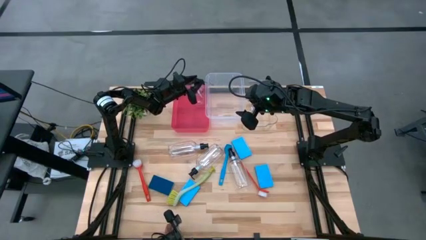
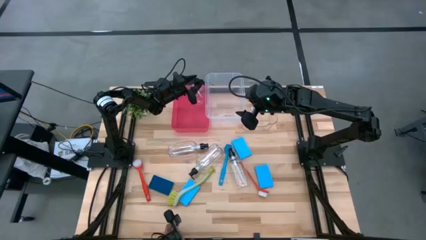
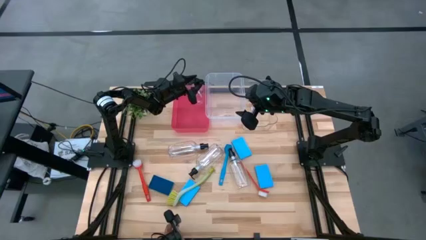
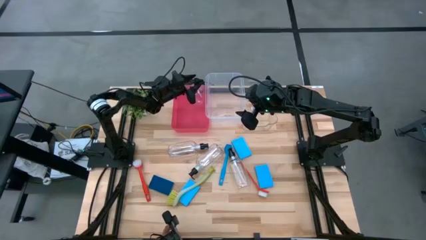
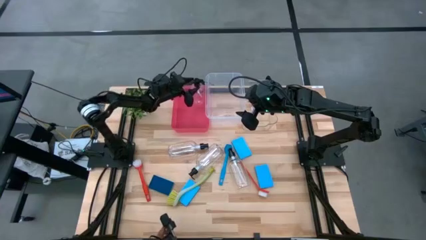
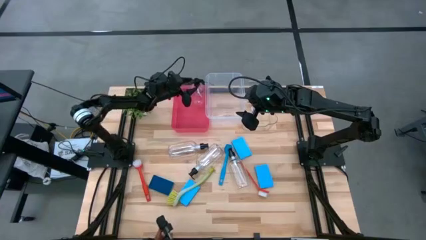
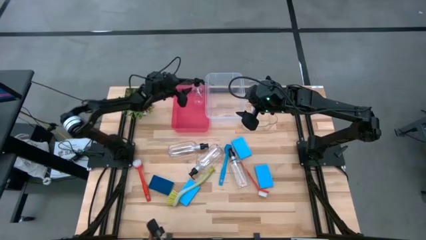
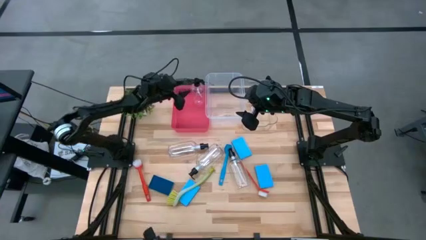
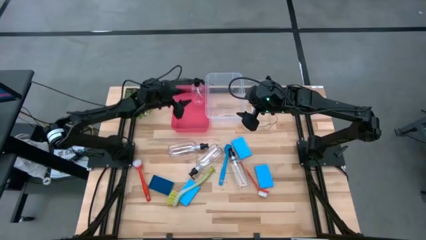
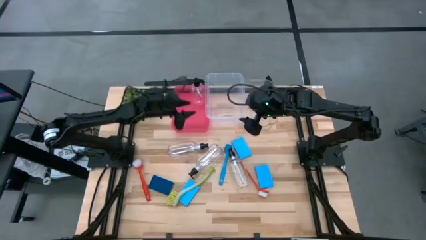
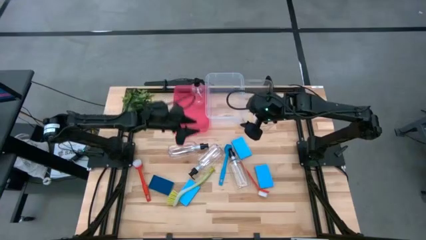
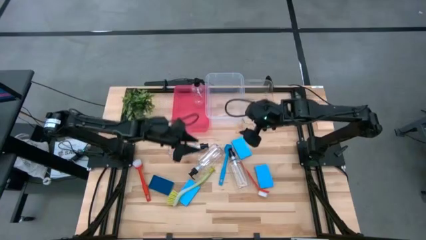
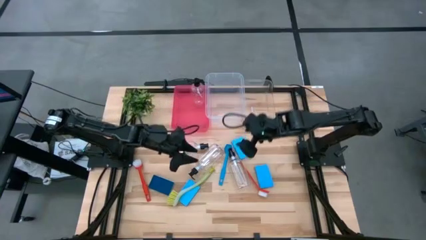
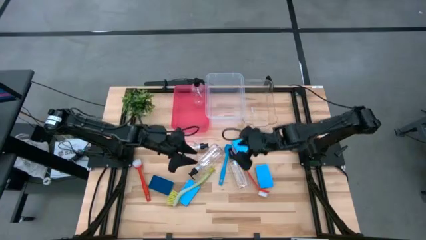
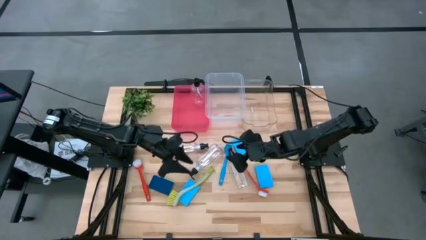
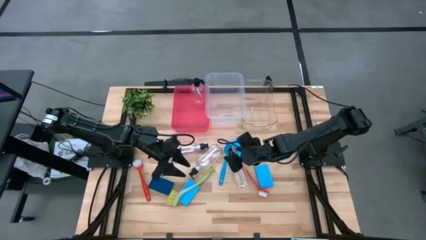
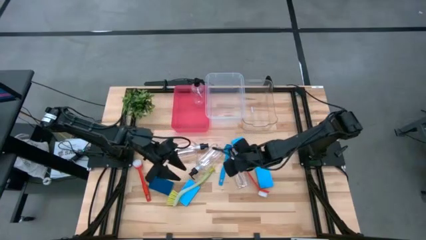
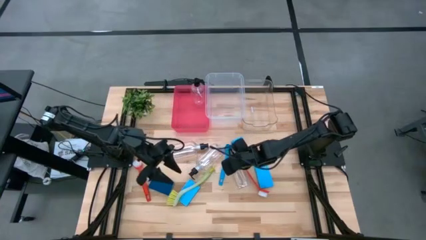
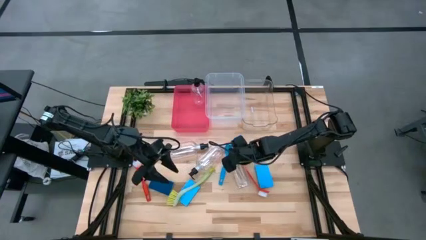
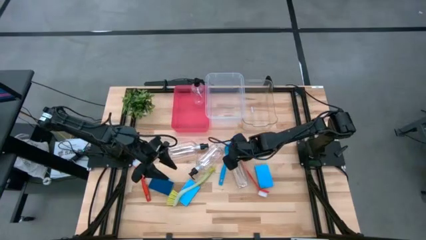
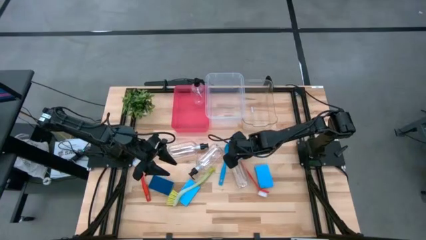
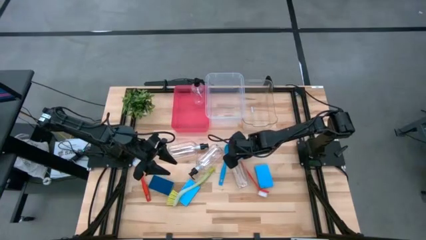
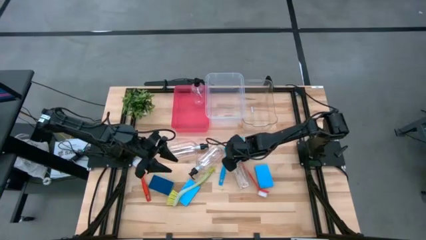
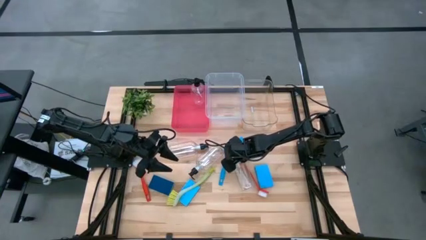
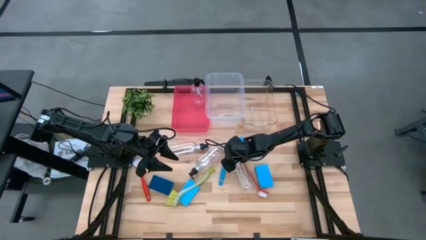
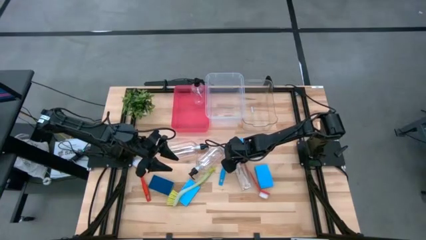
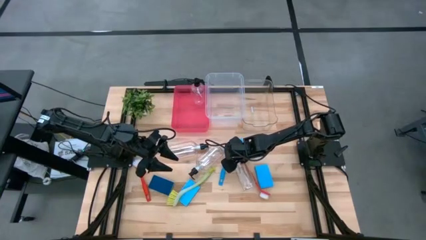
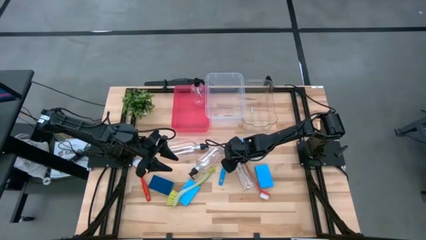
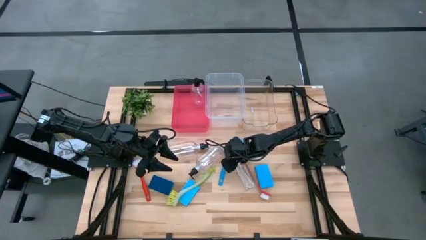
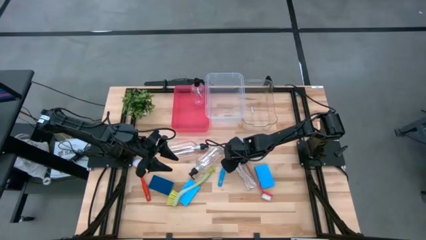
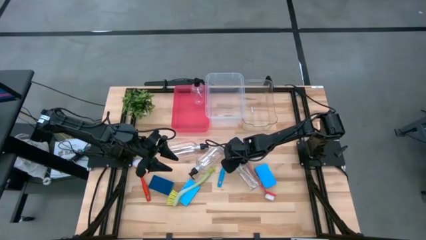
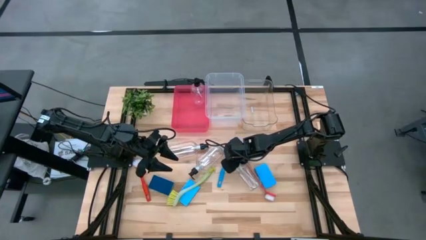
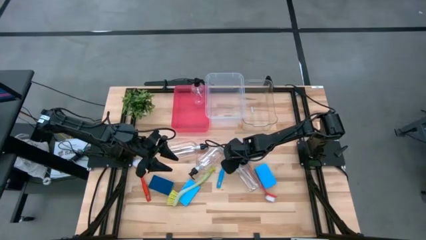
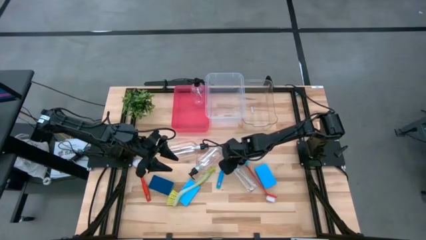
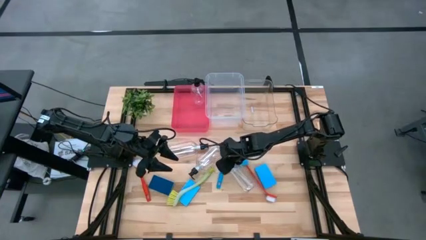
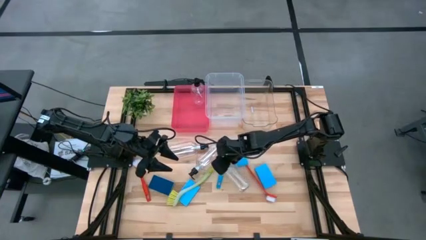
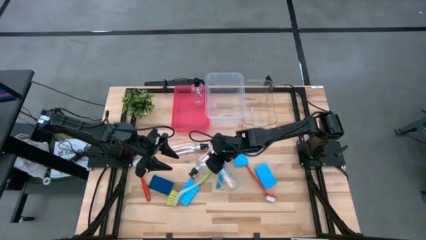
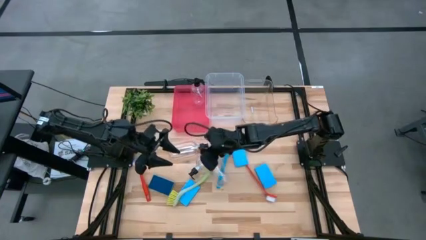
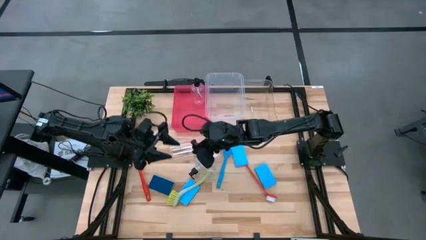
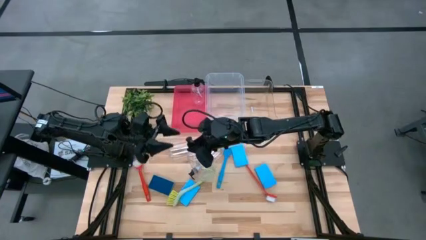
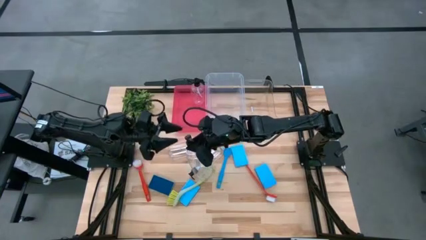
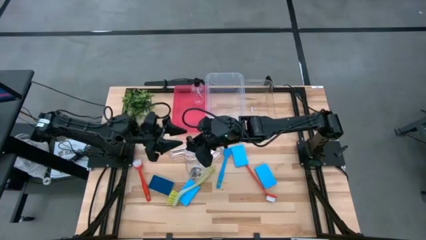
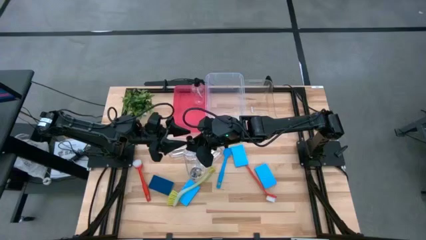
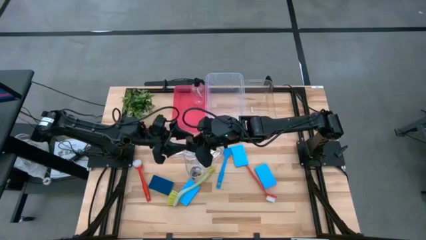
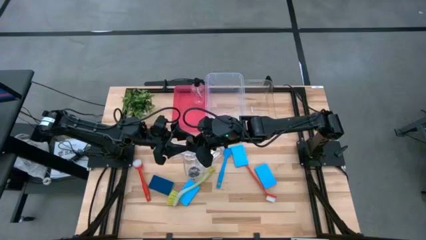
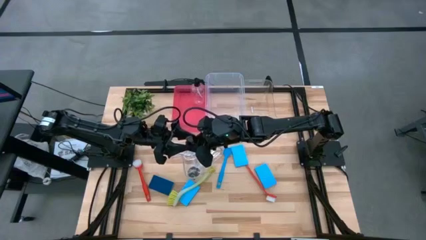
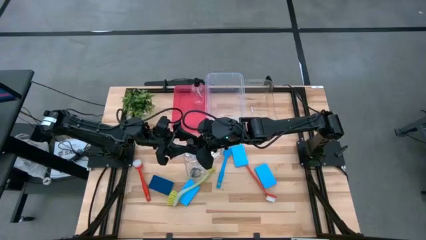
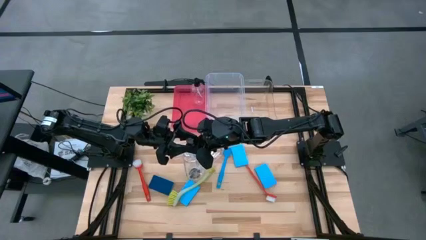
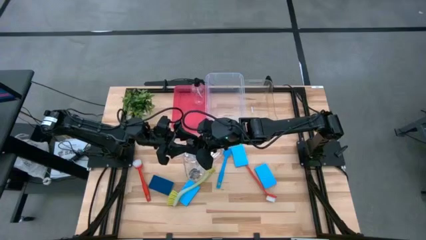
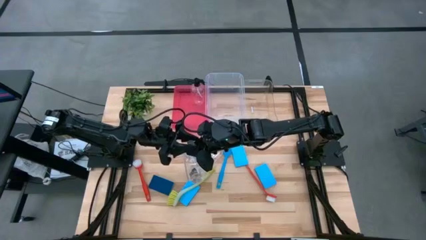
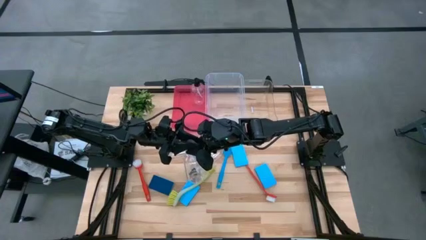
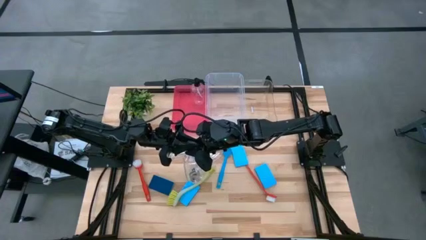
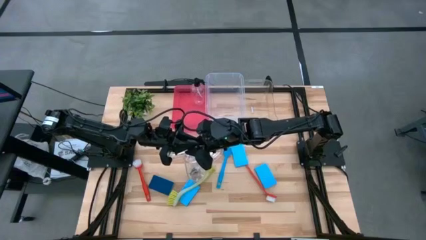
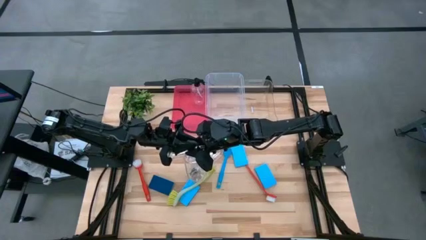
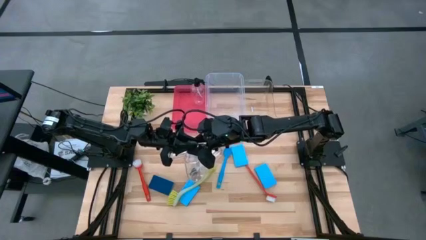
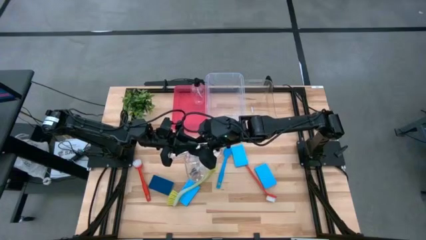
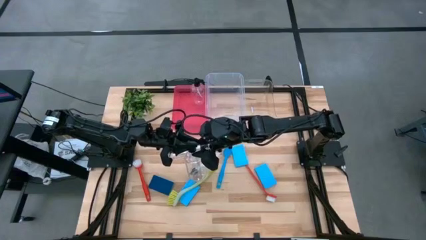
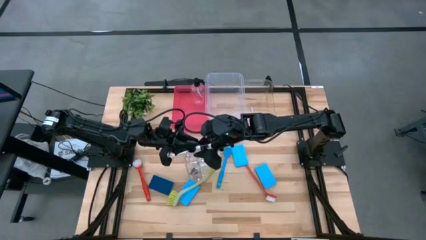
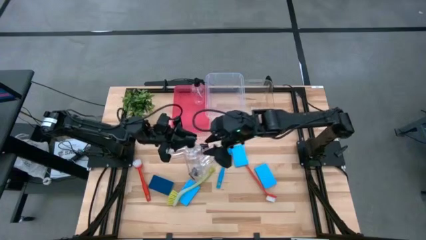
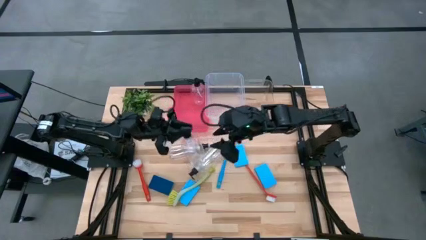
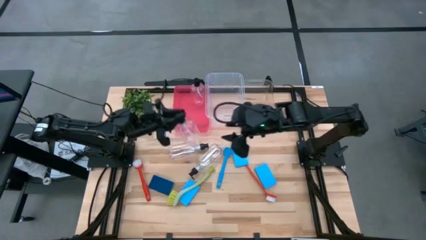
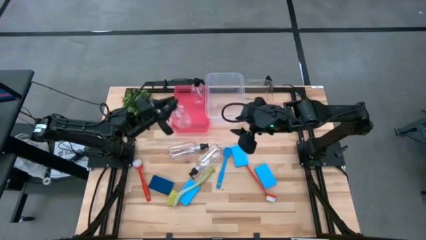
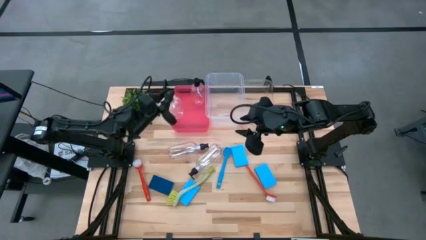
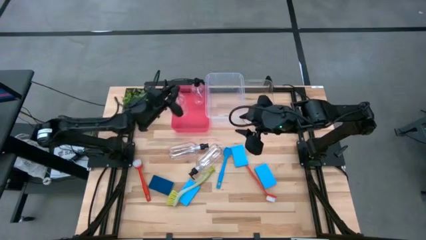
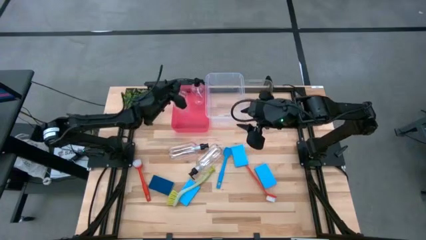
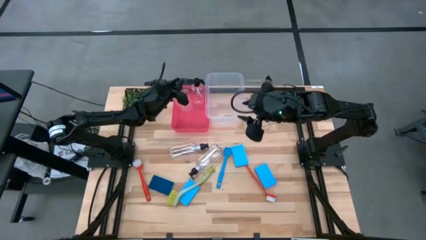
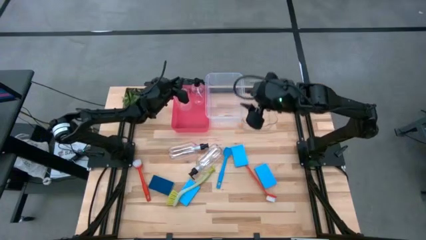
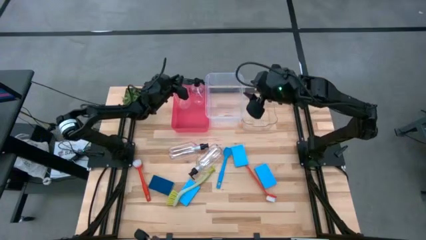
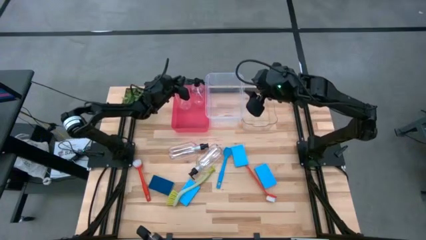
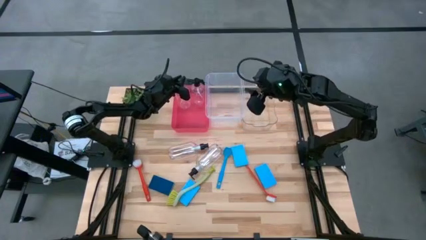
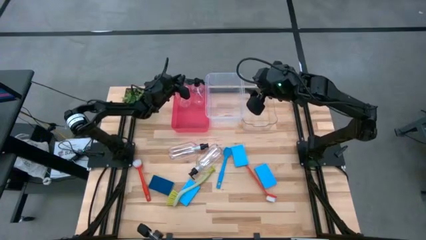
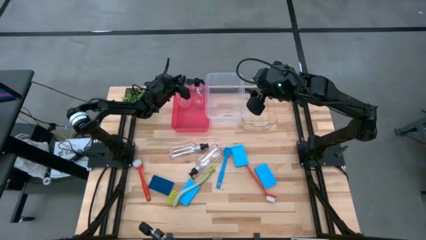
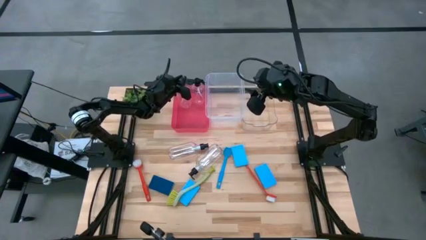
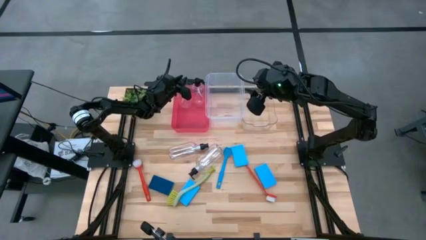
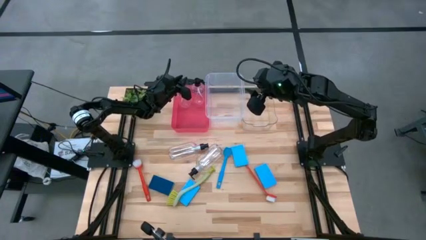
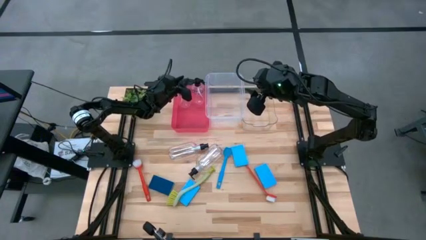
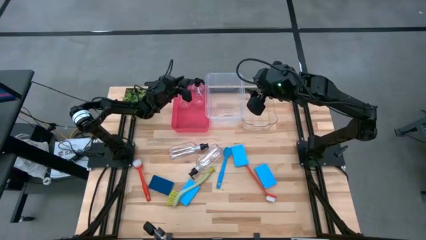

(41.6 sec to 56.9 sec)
Task: Pick & Place Kitchen Sink Supplies
Put the bottom right transparent dishwashing liquid dispenser into the red bin
